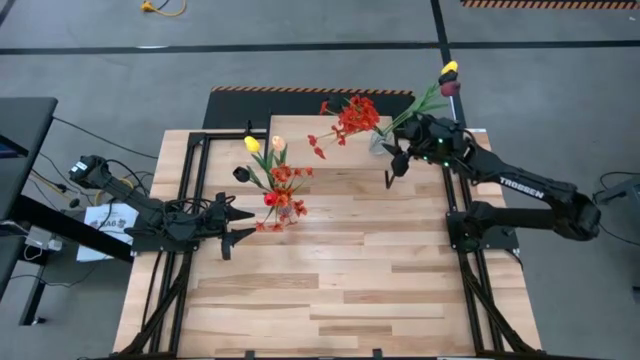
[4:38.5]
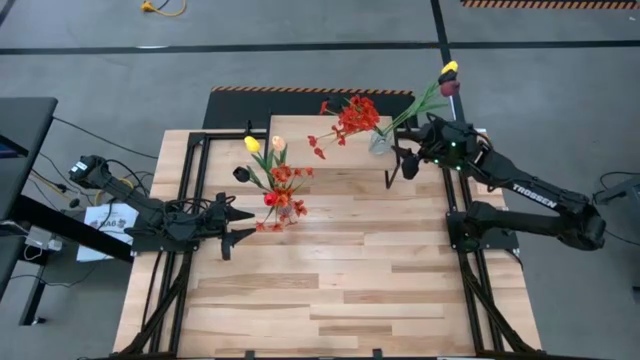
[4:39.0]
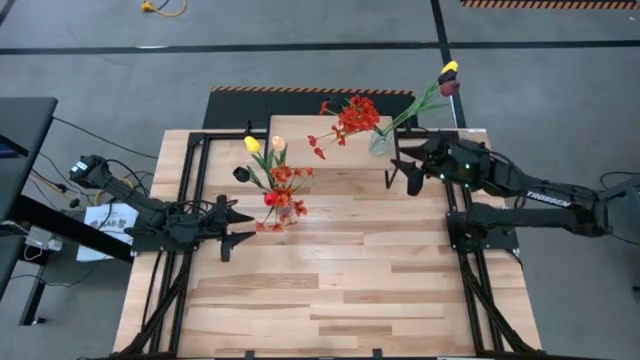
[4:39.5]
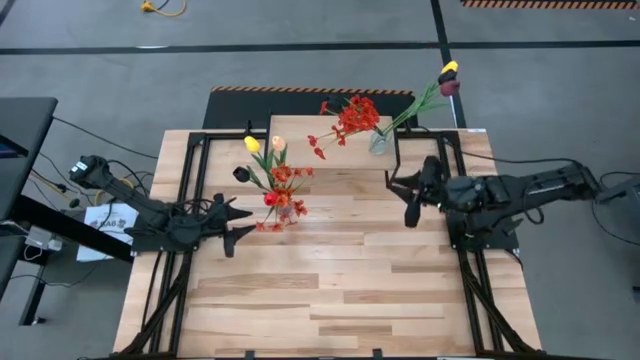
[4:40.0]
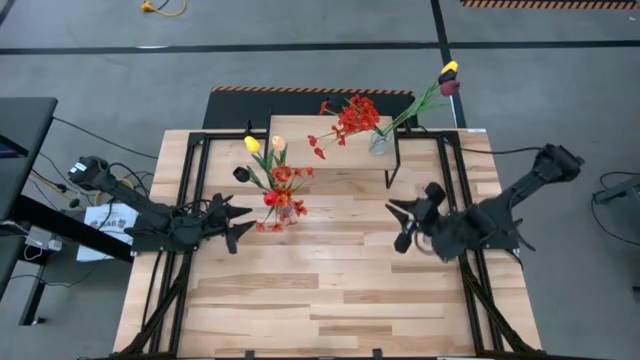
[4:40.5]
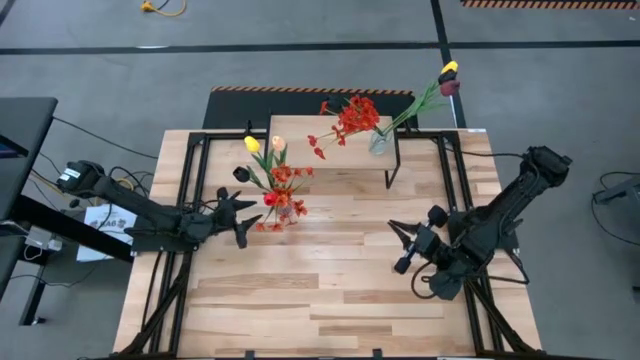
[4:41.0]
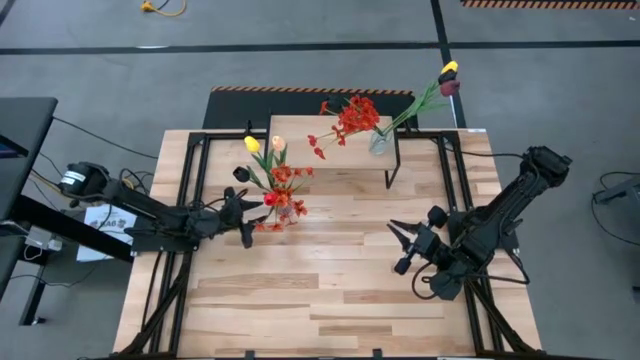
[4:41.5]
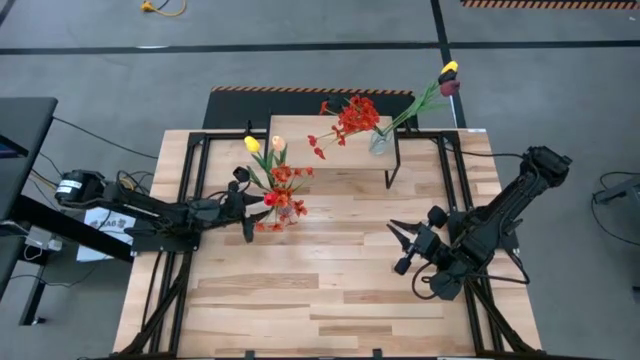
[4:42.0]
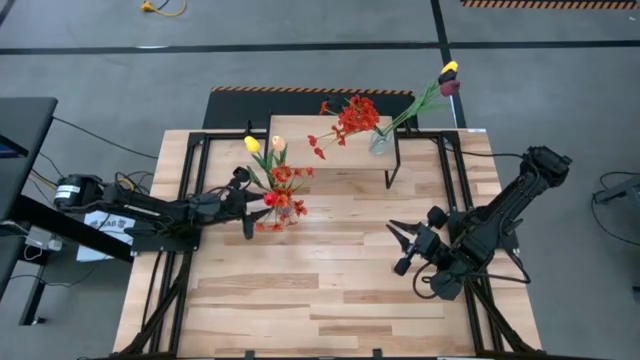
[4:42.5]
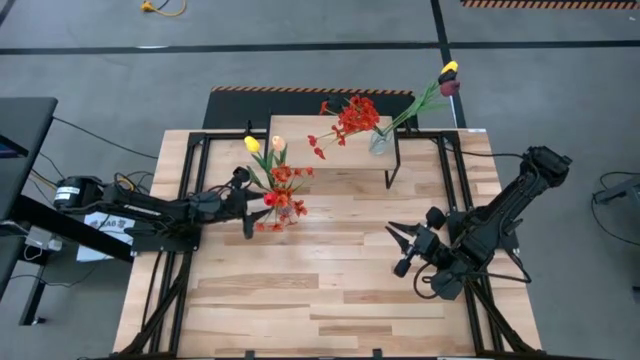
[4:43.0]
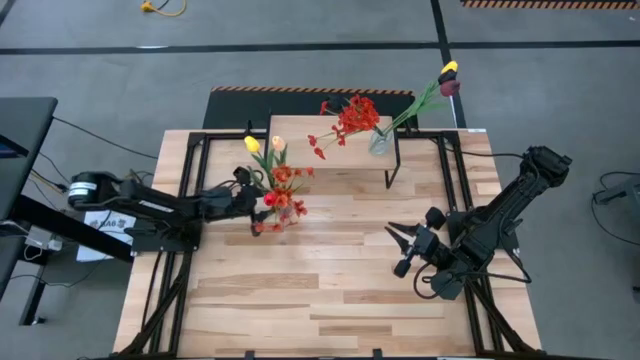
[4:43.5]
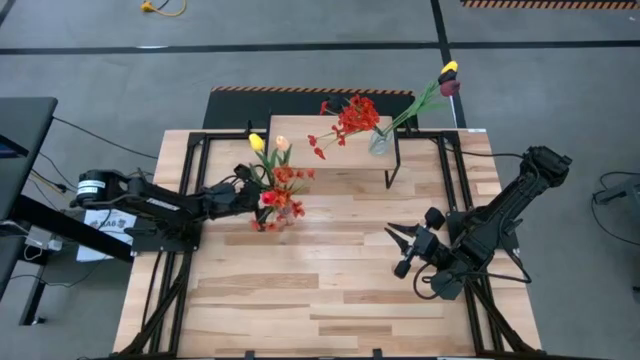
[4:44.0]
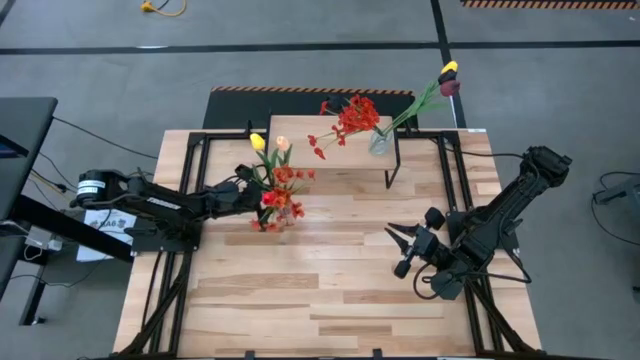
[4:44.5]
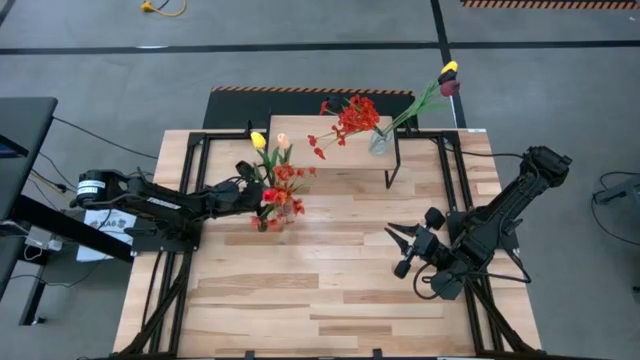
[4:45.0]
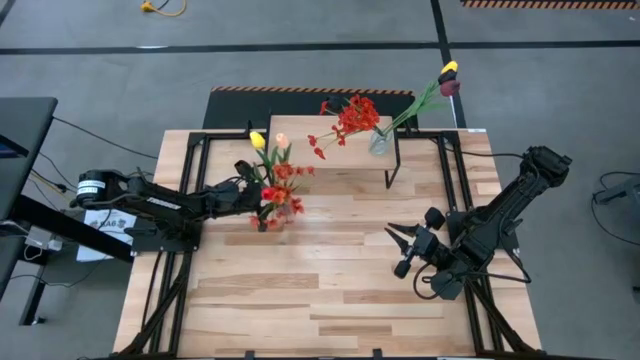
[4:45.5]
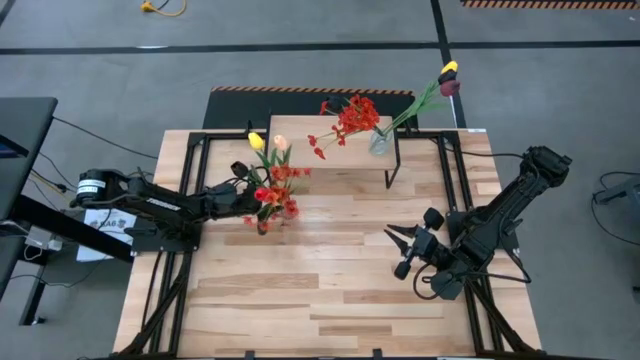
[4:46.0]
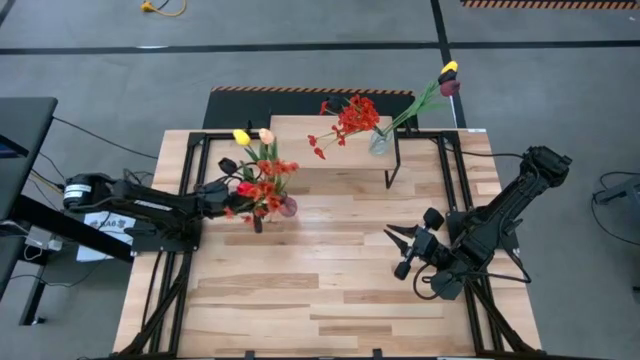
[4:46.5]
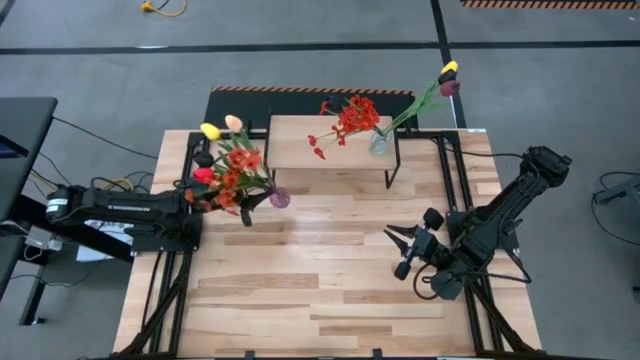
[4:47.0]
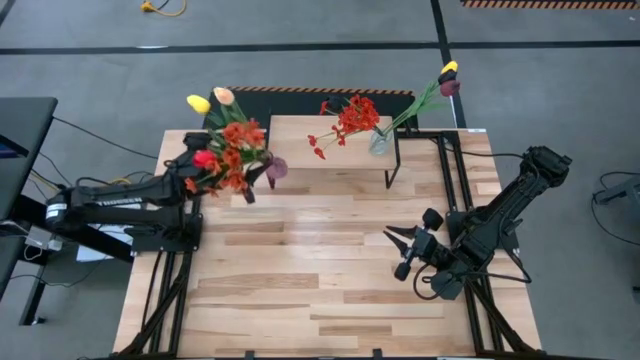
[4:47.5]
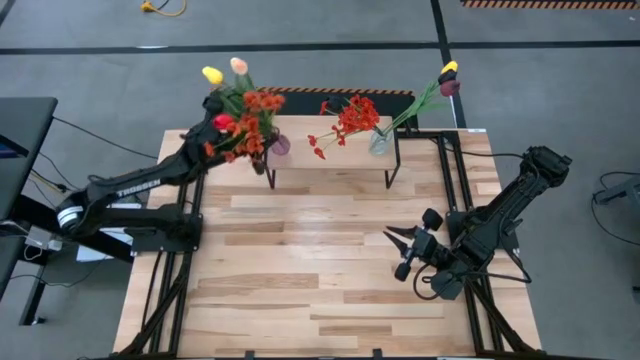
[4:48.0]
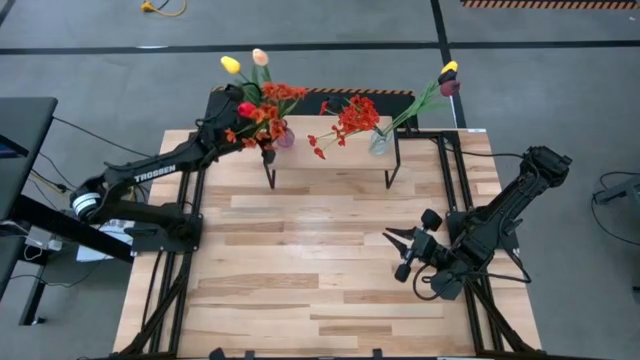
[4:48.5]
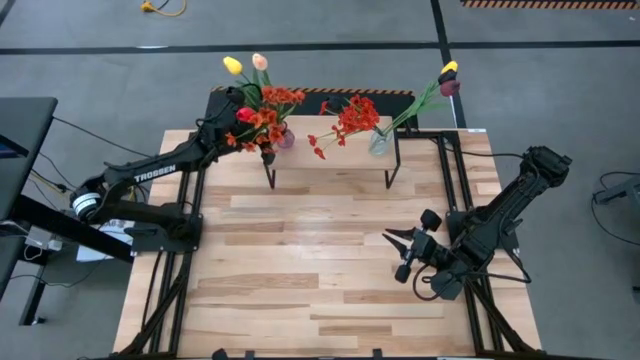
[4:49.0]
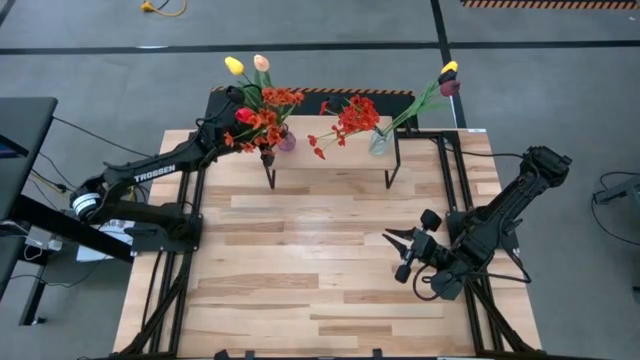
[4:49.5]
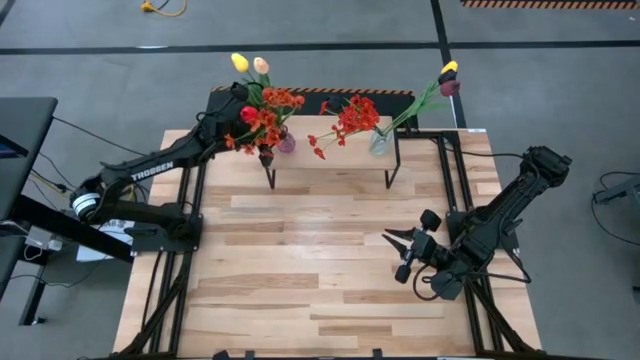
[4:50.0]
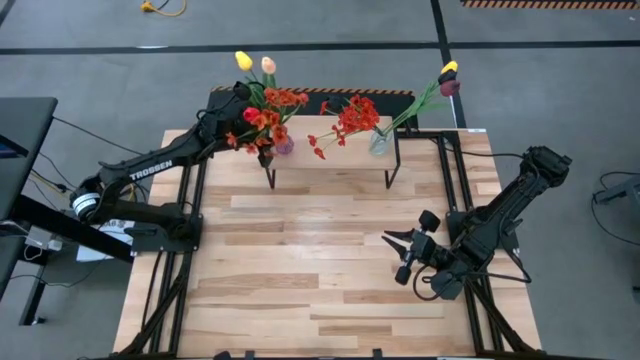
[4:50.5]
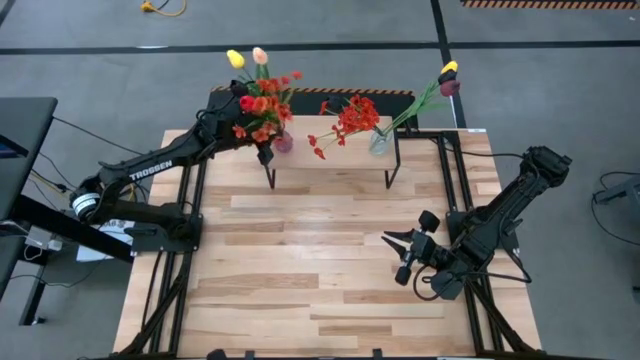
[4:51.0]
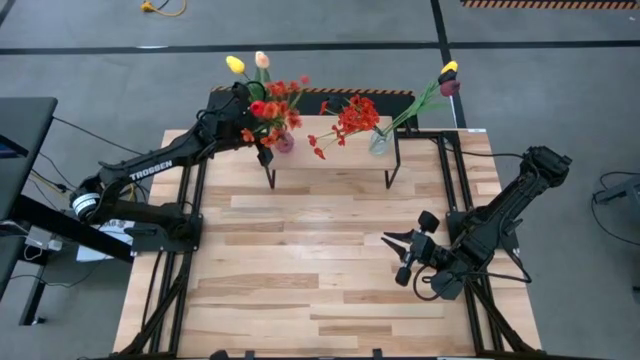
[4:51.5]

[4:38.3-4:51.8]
Task: Pick and place flowers into a vace then onto a shelf
Put the purple vase with flowers on the shelf

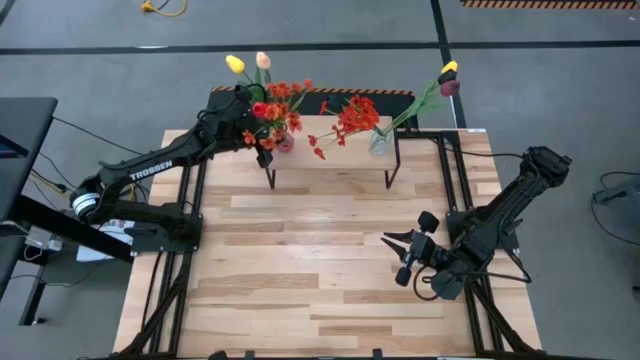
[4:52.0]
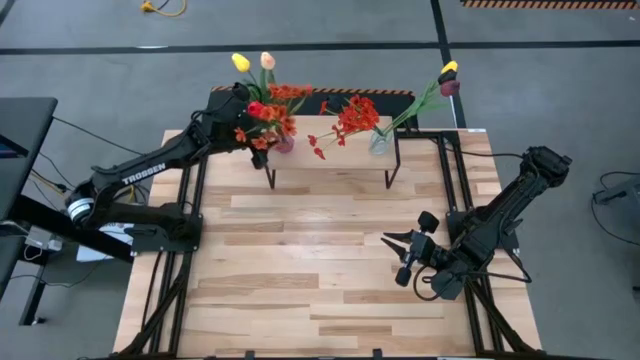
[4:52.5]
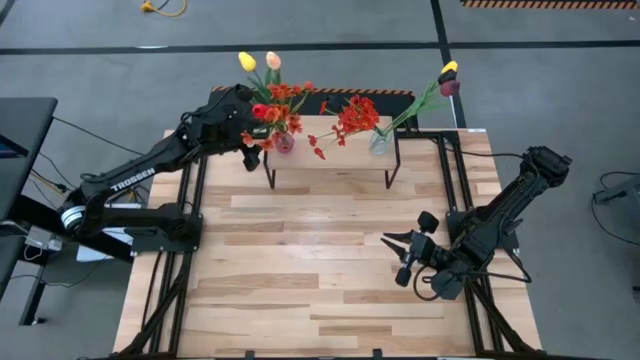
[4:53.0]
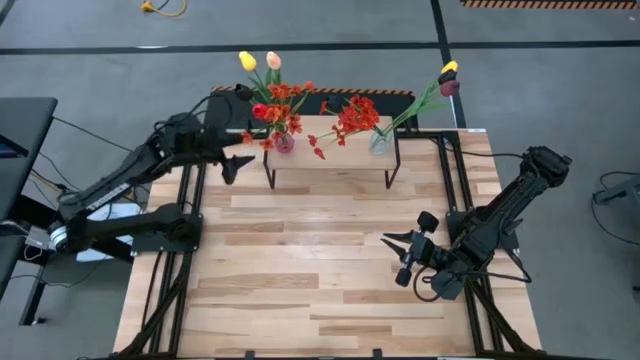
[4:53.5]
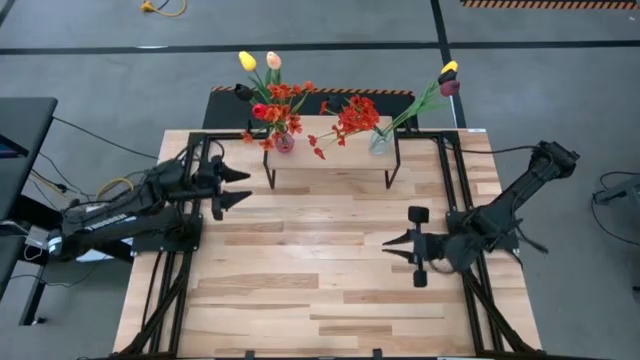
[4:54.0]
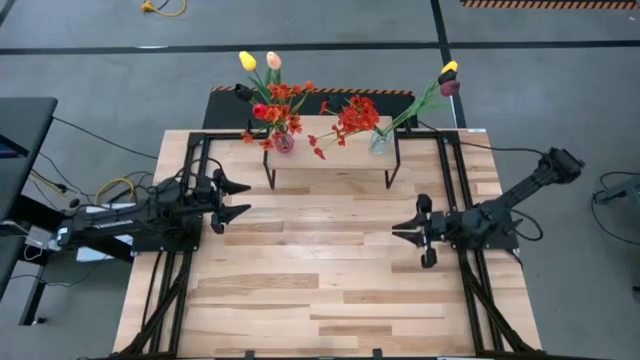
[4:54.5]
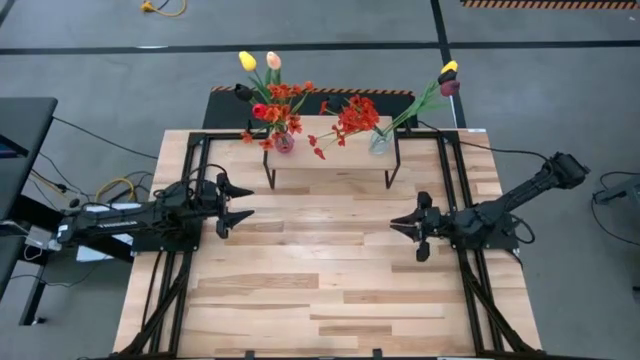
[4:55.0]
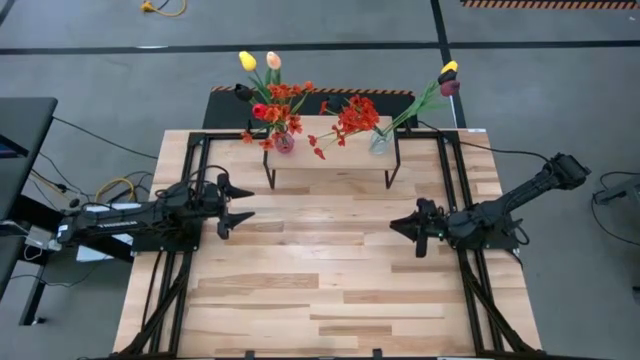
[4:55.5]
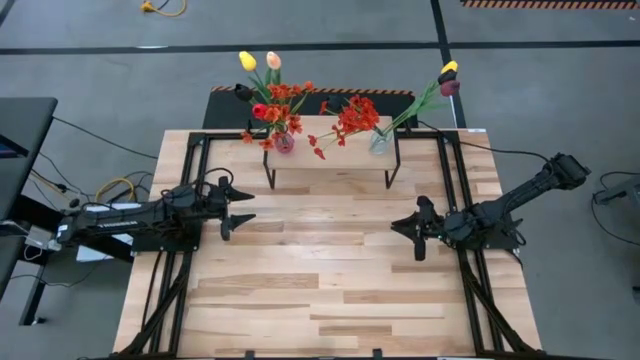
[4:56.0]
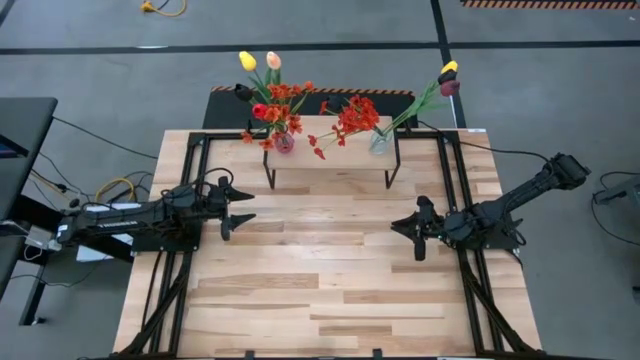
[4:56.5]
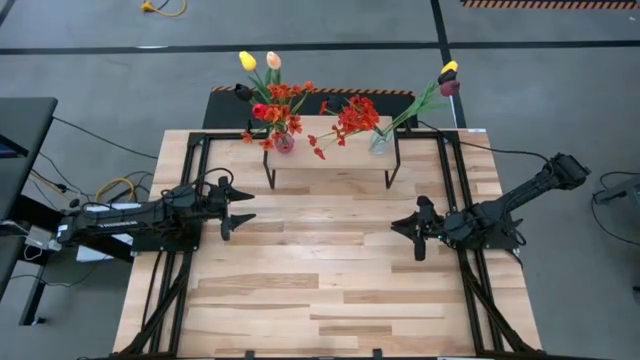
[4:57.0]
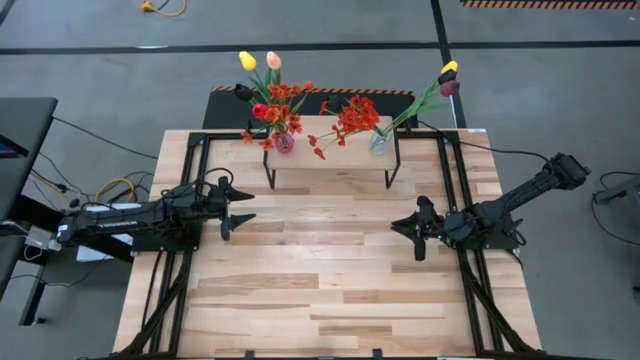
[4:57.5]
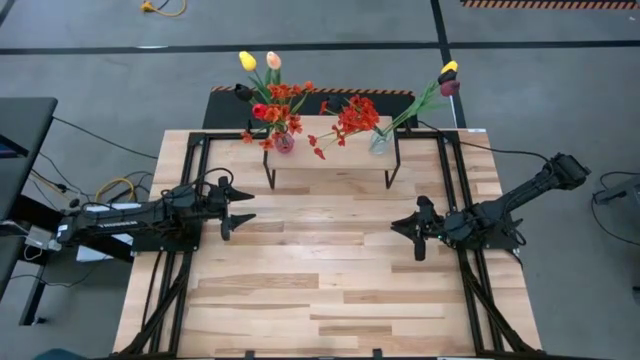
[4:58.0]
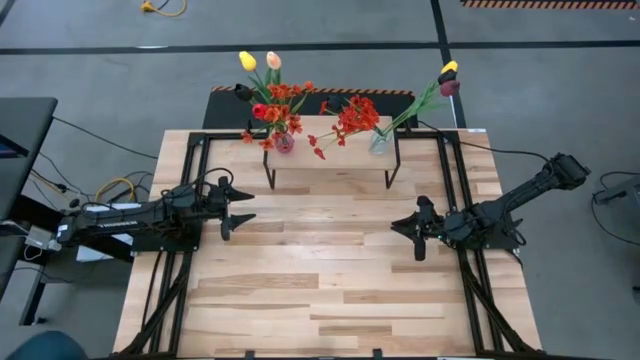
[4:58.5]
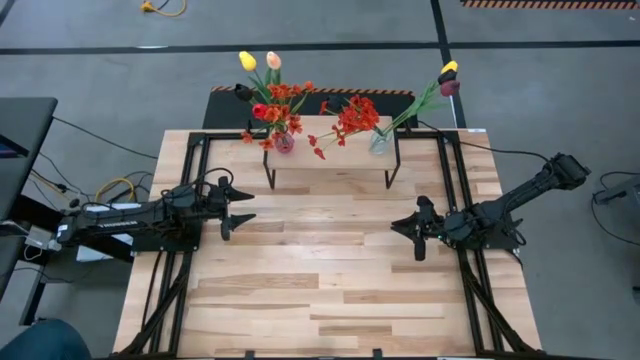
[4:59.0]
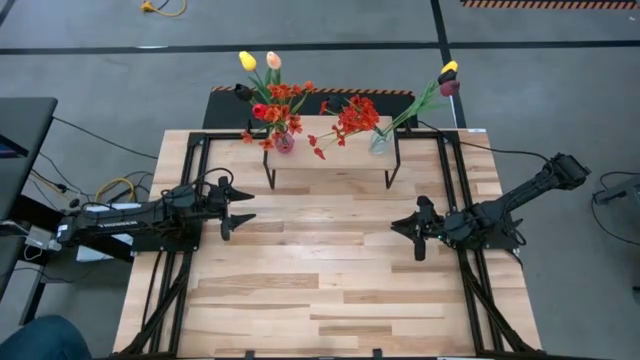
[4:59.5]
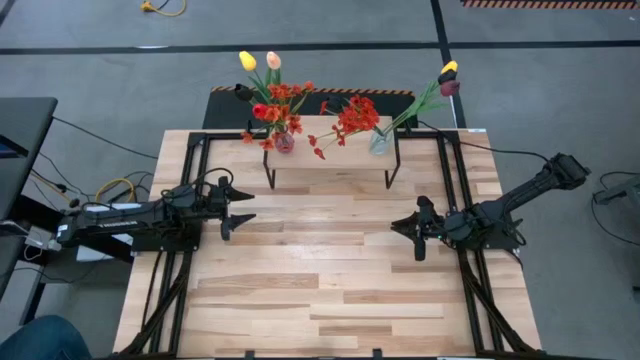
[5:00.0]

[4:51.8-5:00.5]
Return to Home Position
